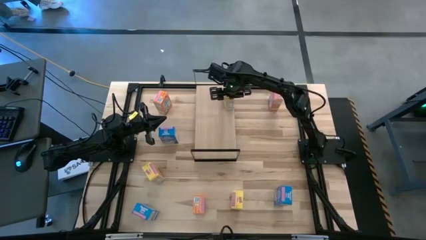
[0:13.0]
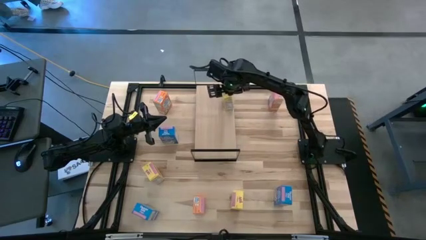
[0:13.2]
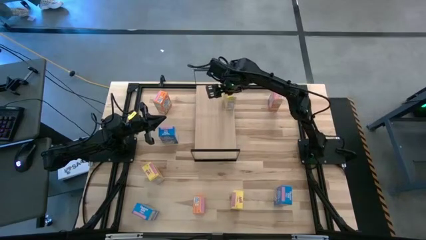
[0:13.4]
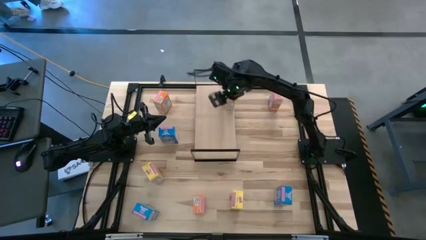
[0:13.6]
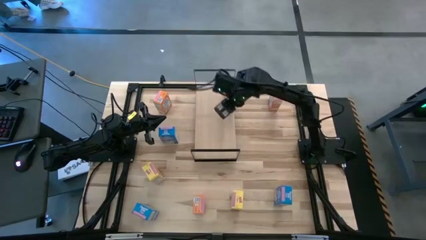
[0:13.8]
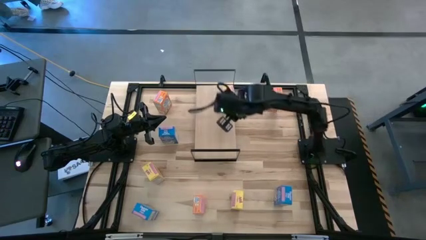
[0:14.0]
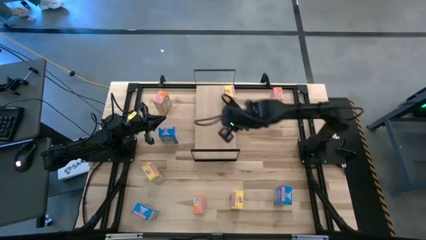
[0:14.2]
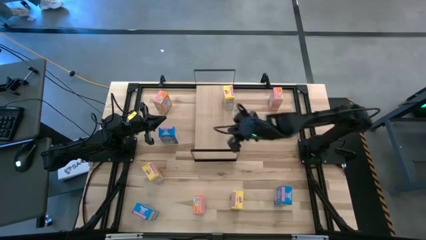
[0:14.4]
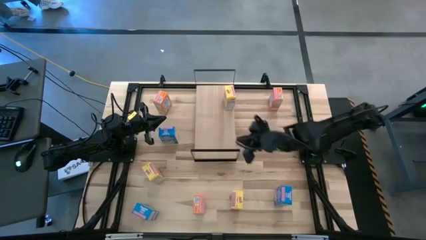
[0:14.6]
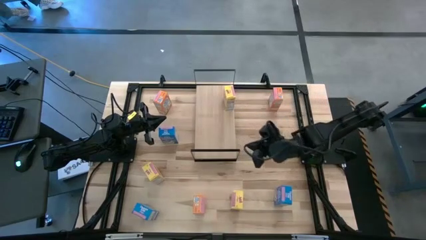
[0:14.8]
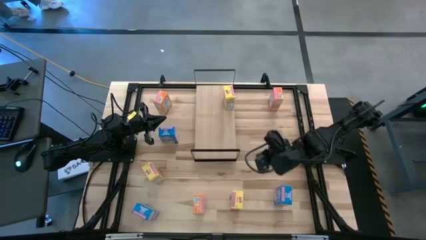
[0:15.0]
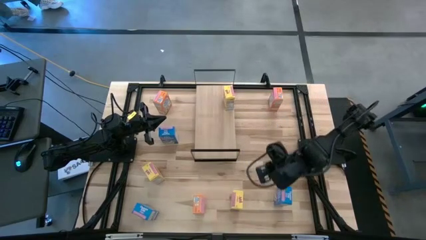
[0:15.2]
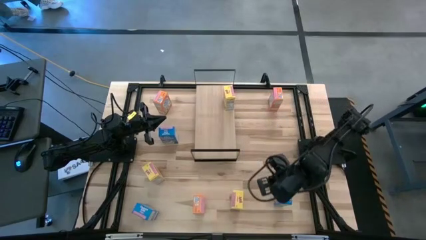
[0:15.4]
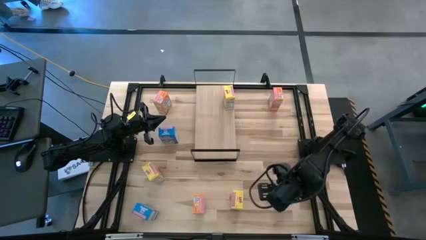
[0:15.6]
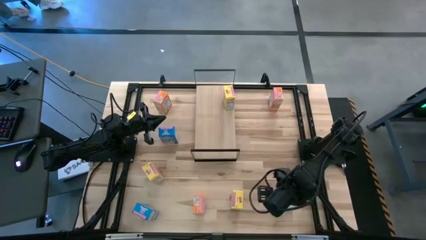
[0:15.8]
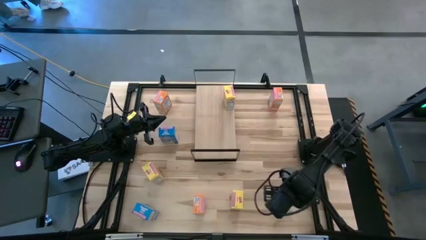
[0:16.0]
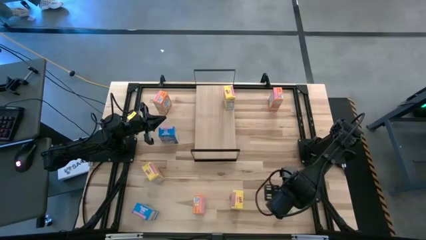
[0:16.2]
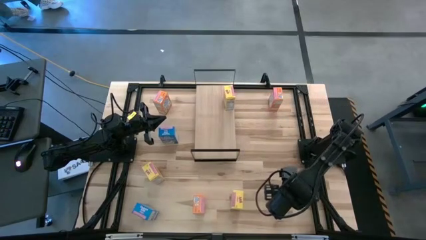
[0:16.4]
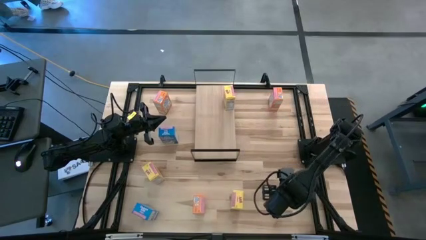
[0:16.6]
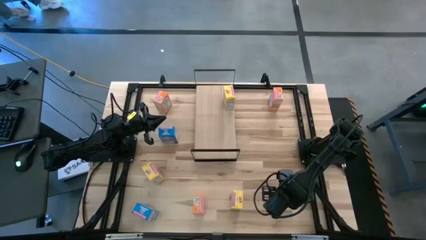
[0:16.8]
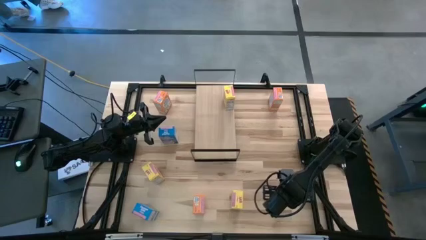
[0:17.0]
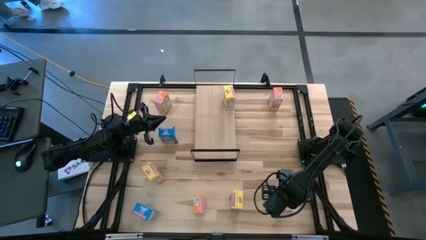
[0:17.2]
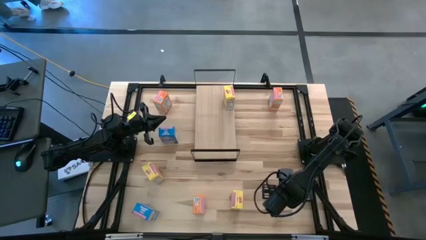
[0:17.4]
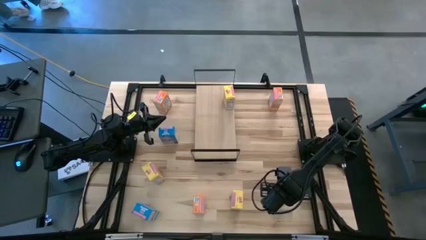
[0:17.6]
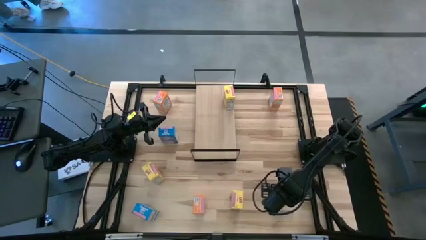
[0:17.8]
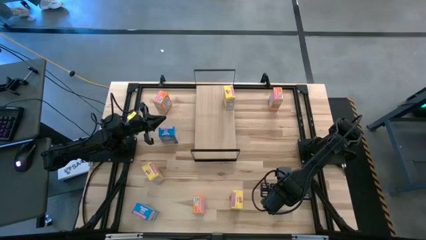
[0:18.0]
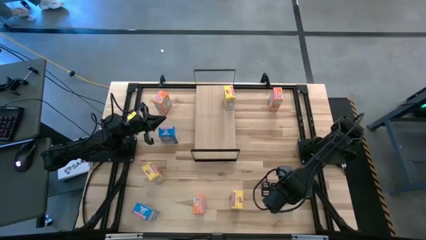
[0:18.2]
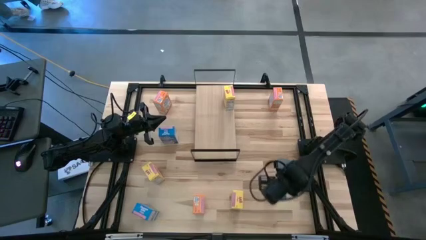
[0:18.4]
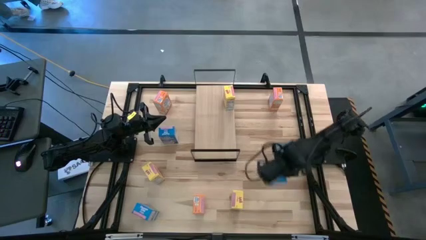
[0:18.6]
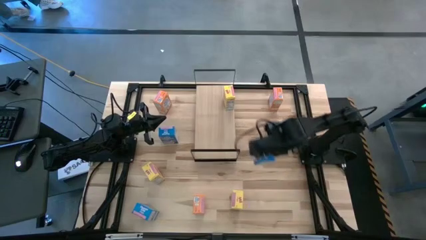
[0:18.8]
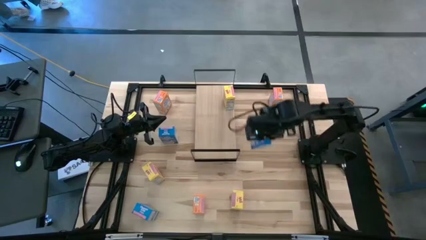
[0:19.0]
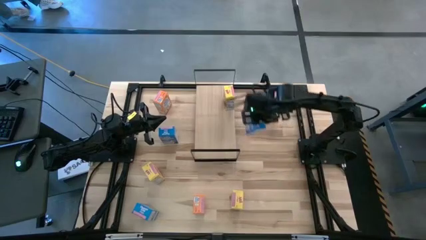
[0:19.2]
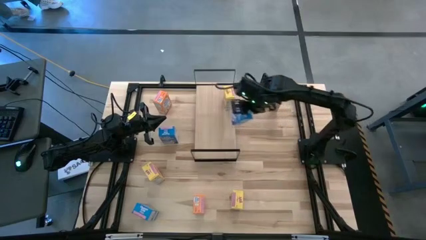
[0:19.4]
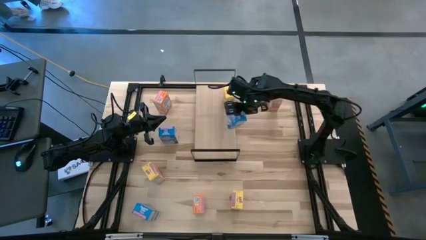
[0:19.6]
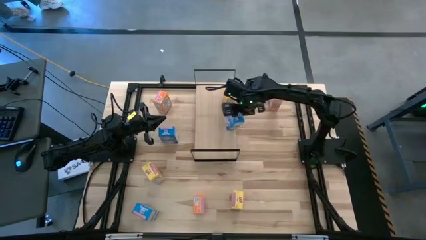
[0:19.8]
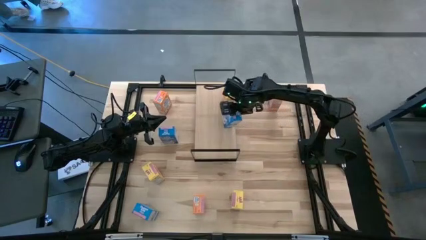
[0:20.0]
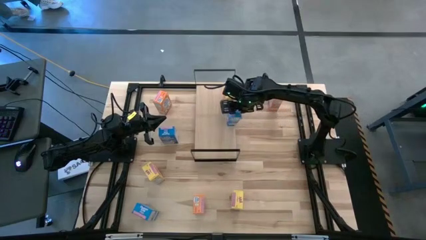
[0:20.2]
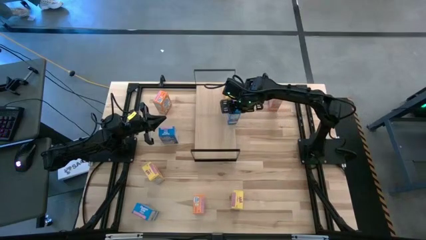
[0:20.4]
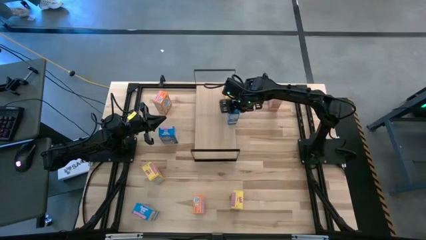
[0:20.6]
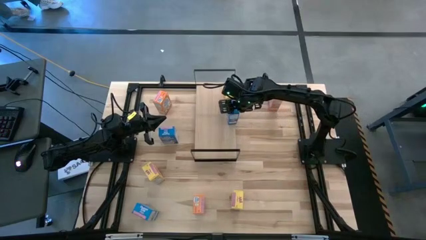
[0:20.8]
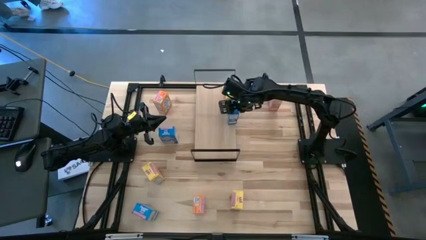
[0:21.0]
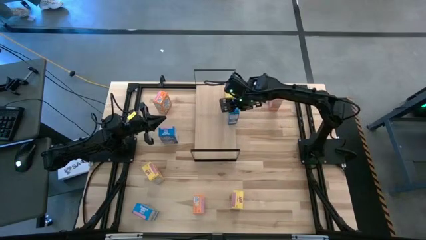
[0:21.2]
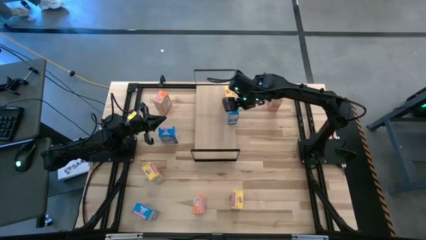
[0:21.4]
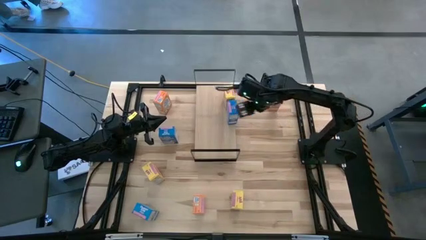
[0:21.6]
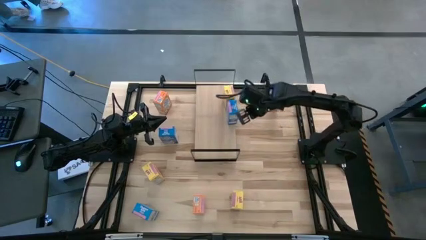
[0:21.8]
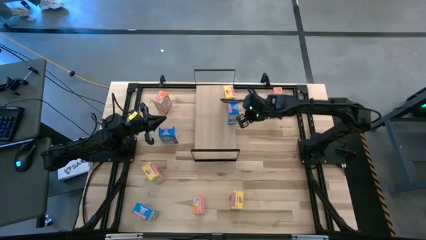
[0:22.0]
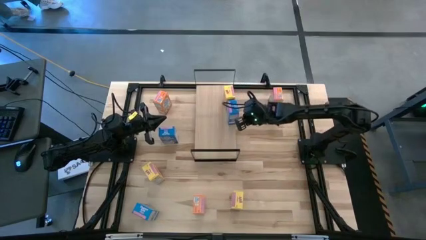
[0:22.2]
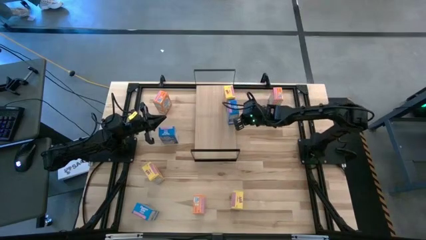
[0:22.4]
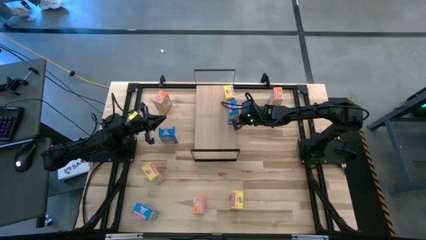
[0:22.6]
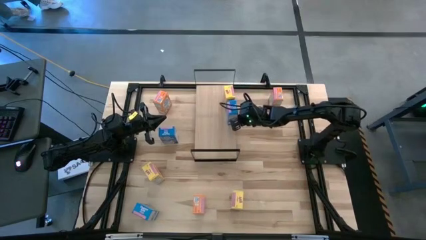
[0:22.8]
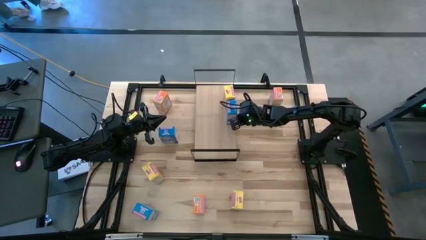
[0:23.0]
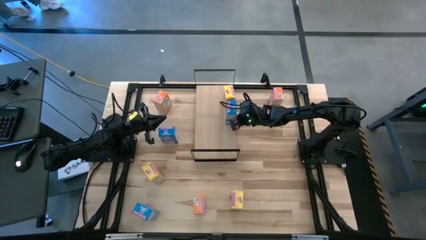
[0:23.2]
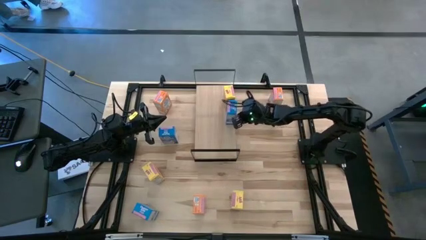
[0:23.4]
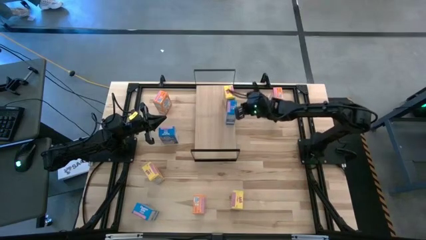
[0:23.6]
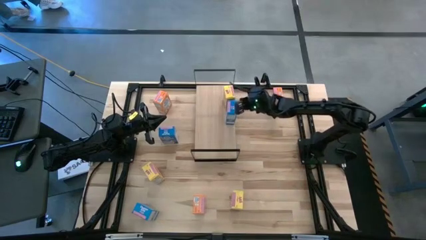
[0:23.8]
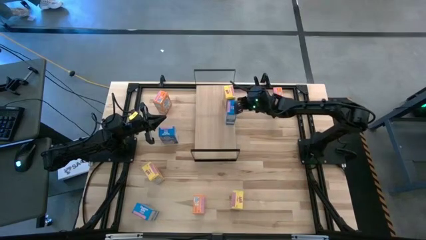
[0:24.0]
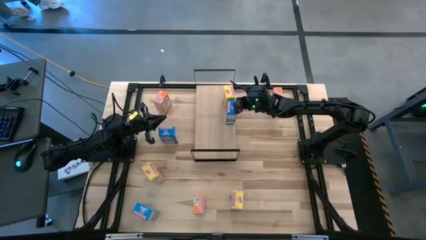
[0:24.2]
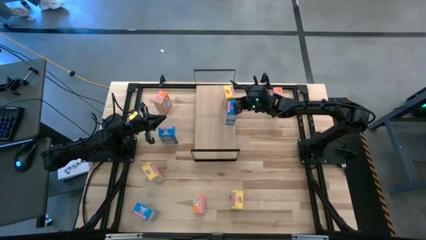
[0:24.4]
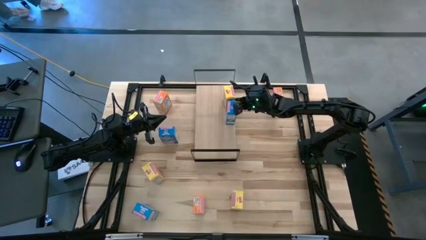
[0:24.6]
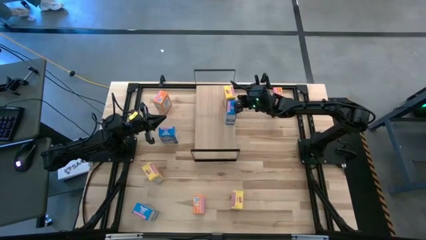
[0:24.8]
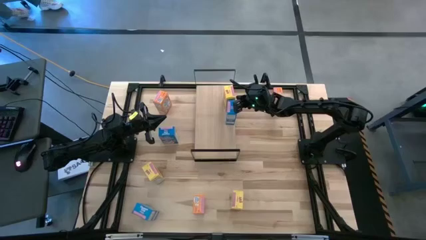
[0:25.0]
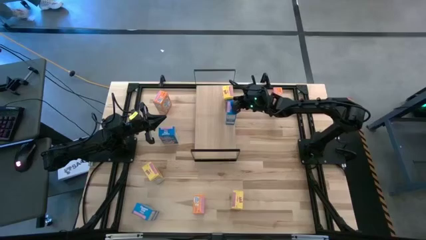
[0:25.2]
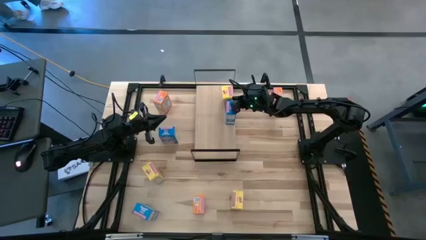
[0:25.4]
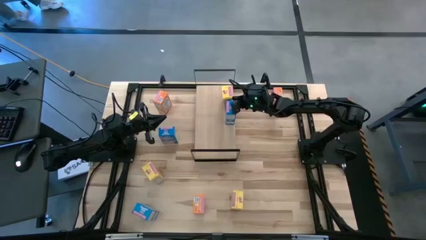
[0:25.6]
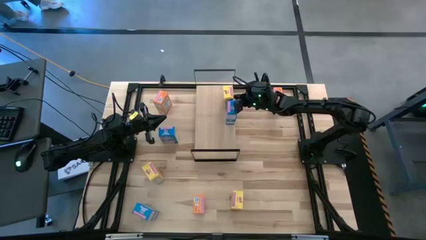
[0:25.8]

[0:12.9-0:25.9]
Task: Stack cereal on shelf
Put the bottom right blue cereal box on the shelf

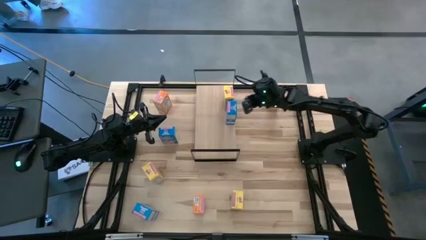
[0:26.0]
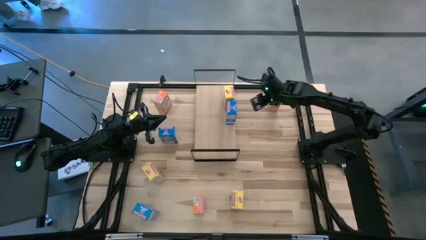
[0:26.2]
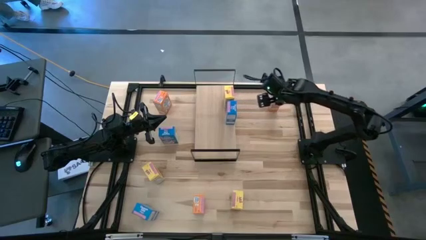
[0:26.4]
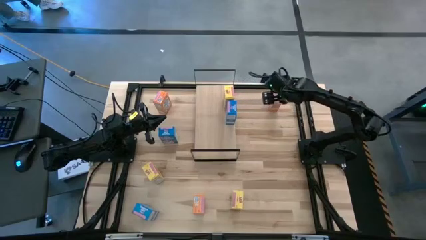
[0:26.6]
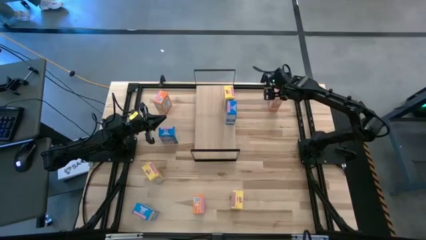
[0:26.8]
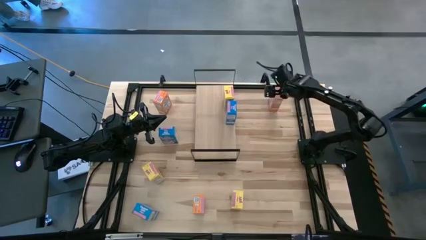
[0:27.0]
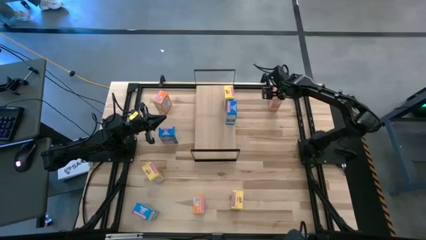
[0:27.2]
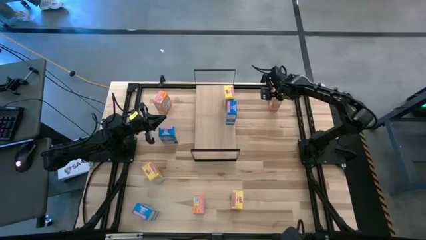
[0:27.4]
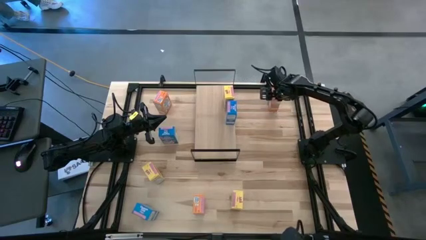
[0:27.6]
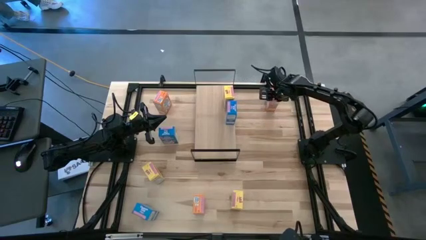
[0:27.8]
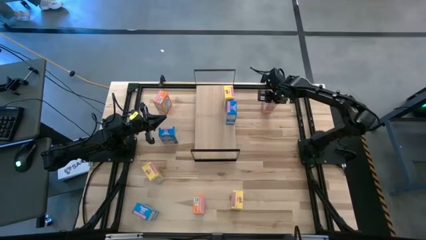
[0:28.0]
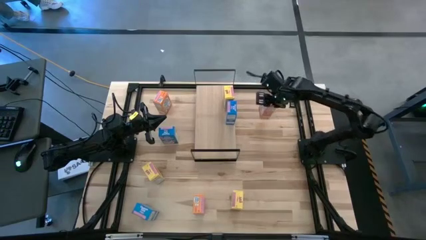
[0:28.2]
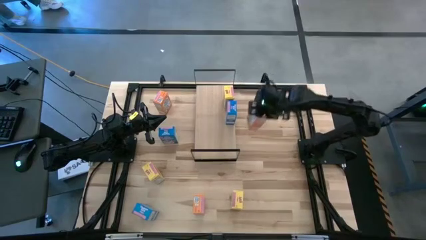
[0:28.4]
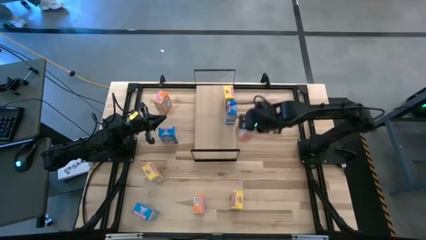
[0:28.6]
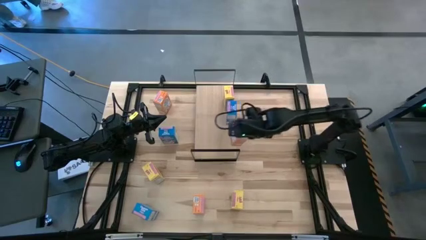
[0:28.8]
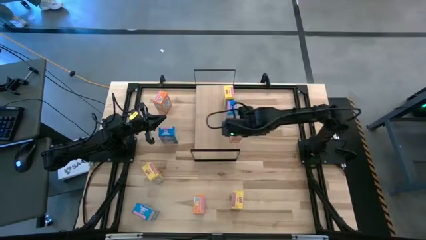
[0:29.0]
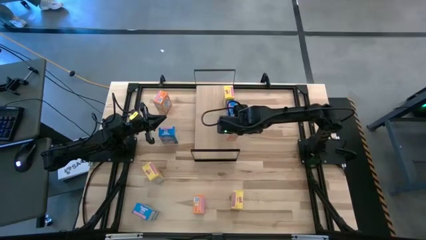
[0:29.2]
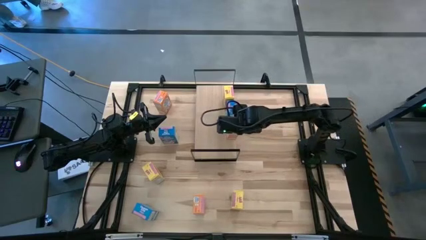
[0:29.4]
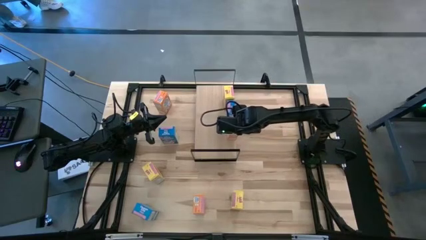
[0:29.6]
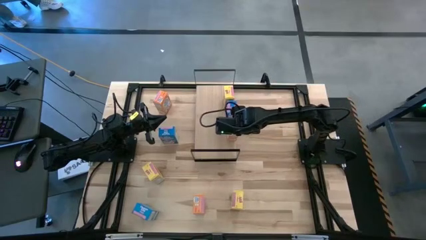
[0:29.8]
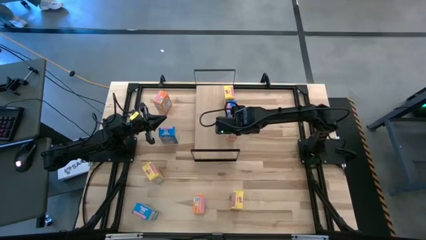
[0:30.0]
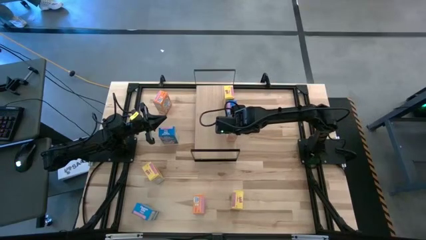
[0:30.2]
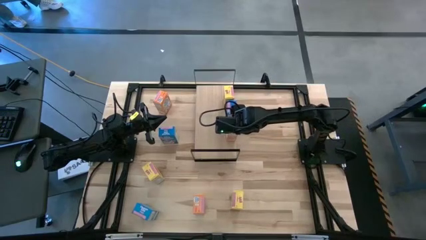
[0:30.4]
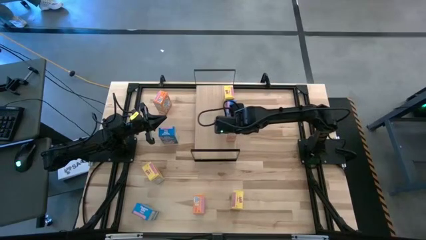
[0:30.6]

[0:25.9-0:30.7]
Put the top right orange cereal box on the shelf
